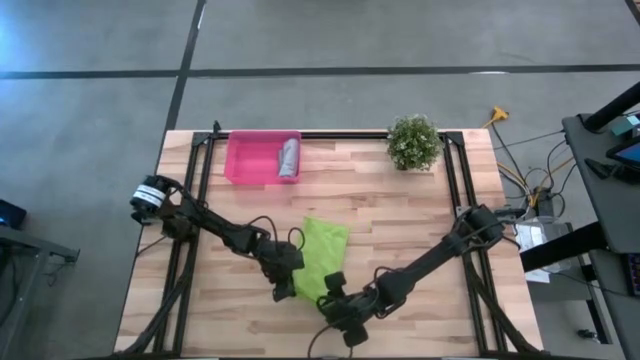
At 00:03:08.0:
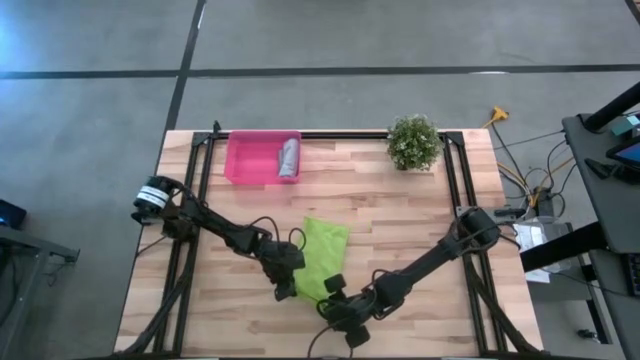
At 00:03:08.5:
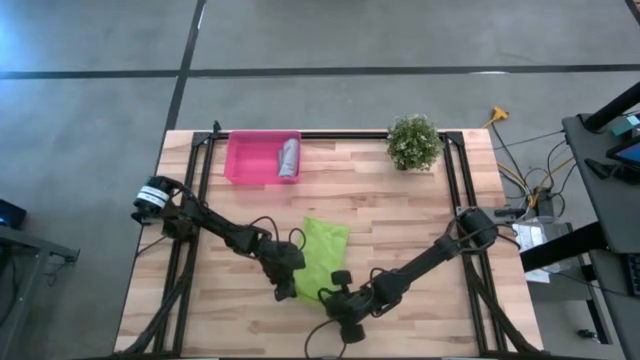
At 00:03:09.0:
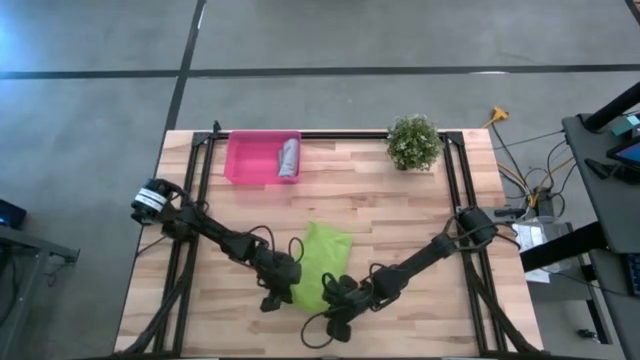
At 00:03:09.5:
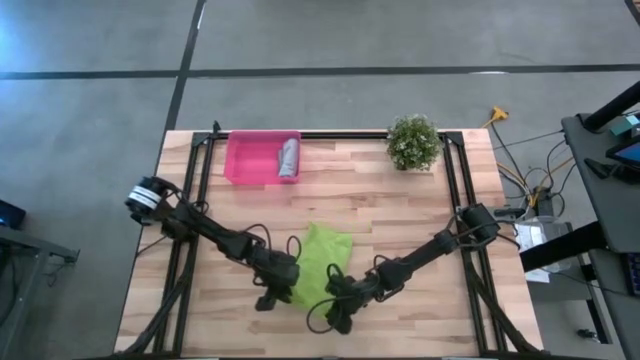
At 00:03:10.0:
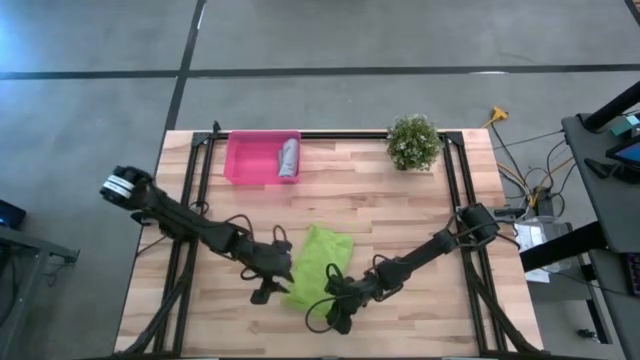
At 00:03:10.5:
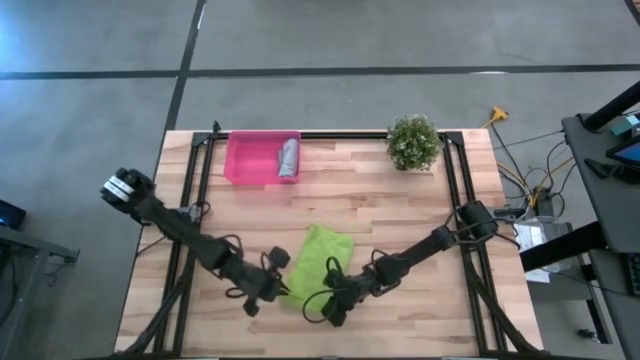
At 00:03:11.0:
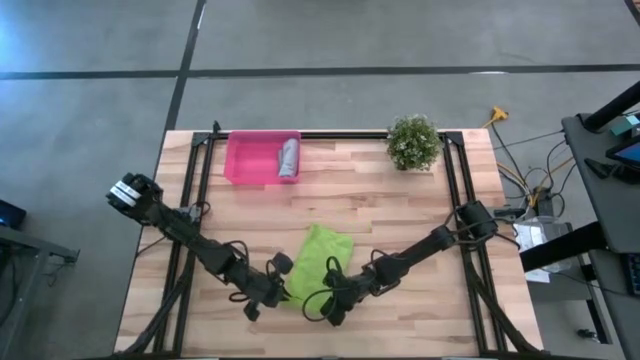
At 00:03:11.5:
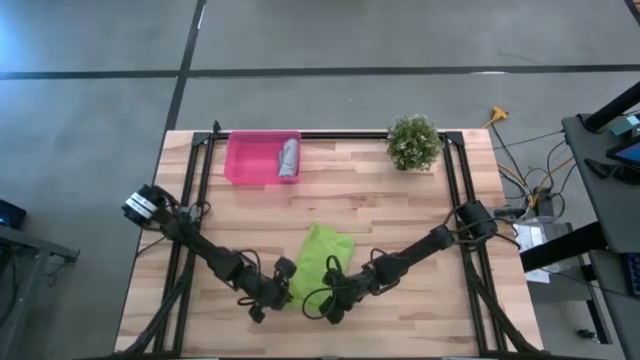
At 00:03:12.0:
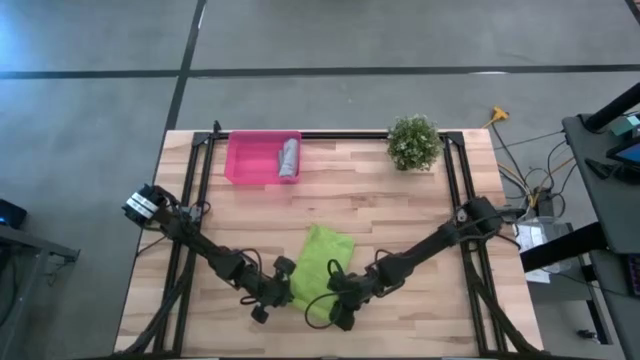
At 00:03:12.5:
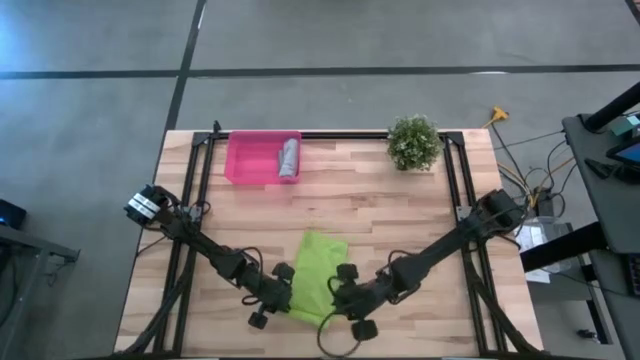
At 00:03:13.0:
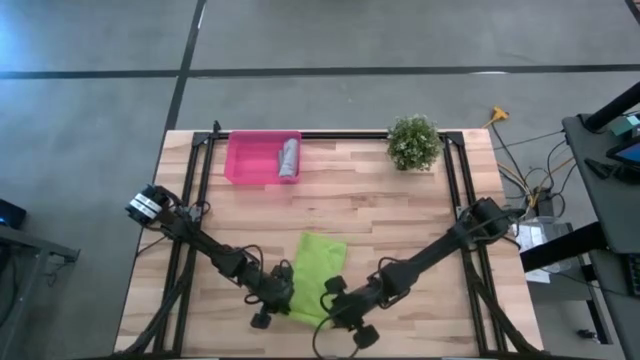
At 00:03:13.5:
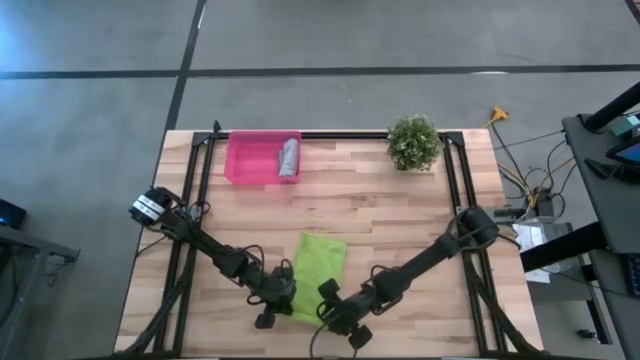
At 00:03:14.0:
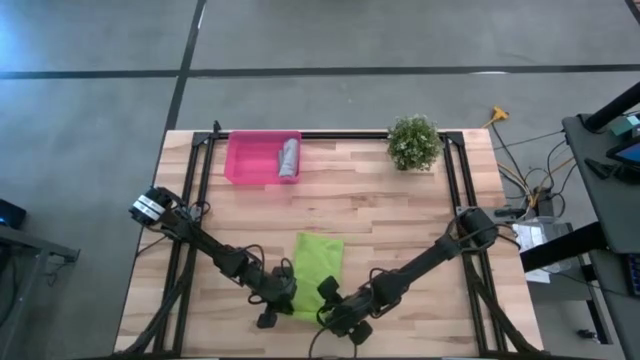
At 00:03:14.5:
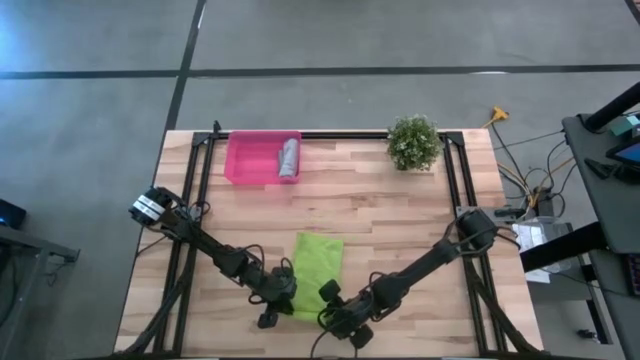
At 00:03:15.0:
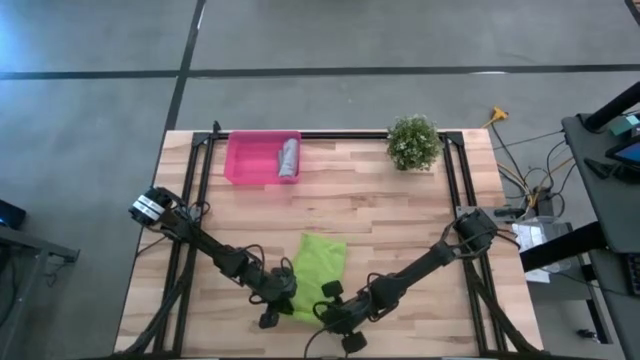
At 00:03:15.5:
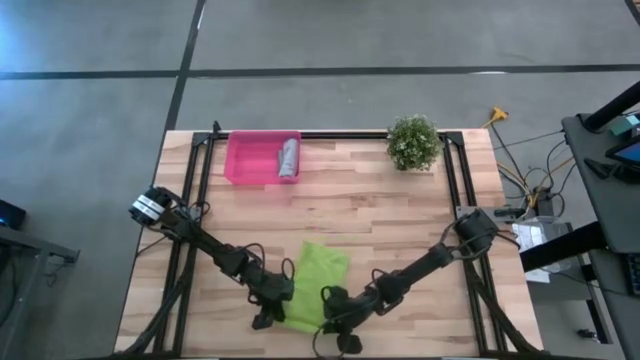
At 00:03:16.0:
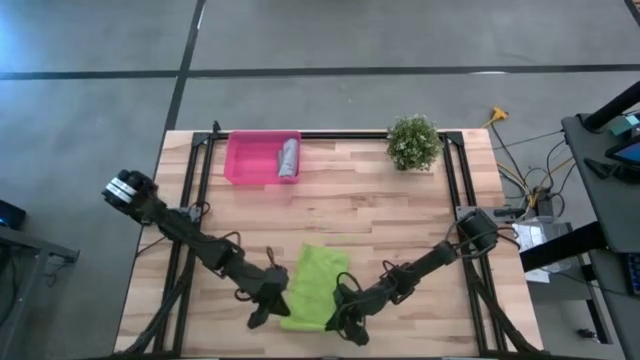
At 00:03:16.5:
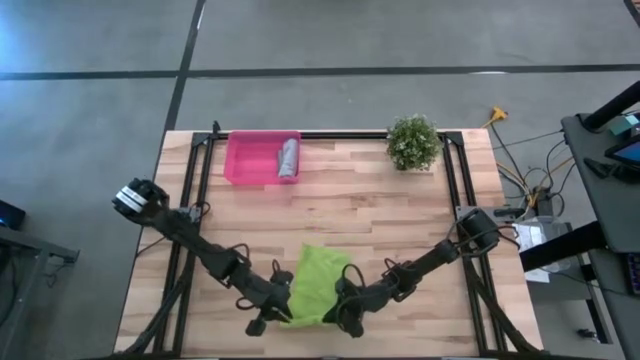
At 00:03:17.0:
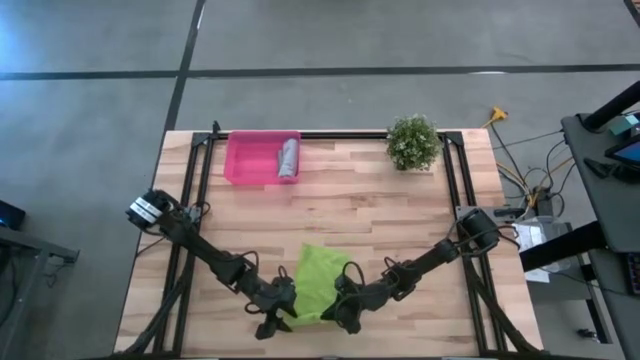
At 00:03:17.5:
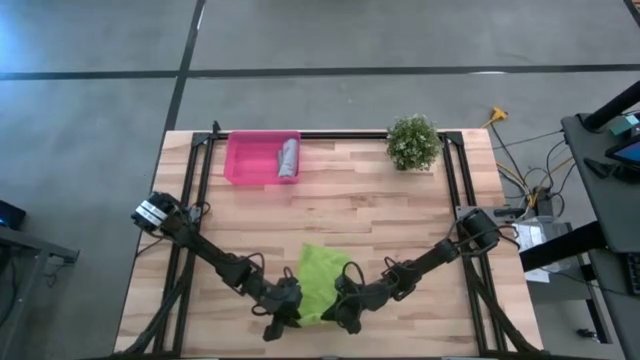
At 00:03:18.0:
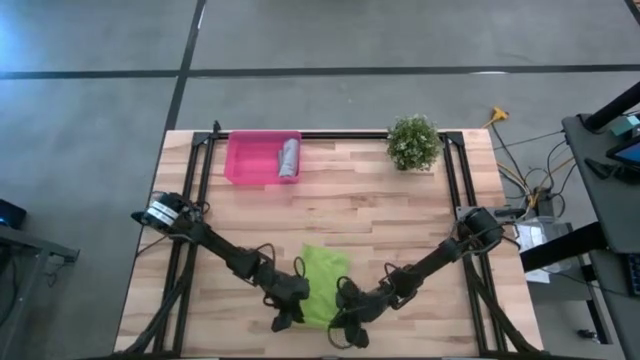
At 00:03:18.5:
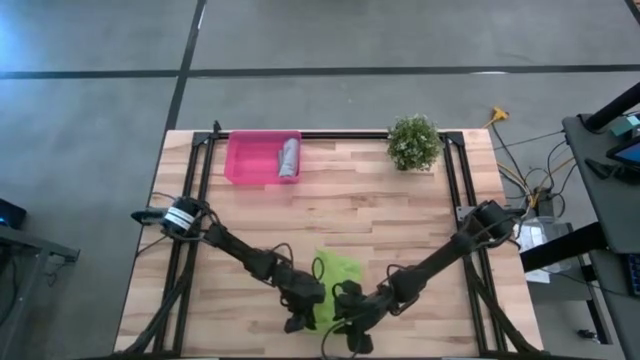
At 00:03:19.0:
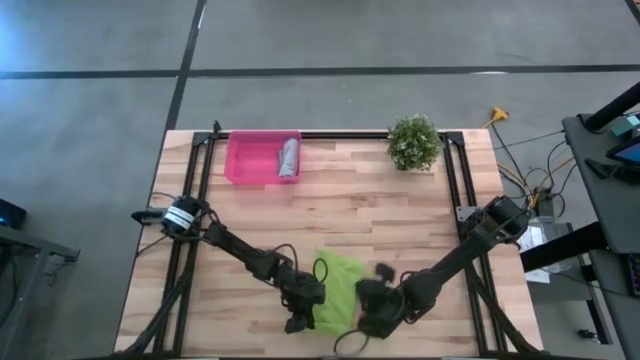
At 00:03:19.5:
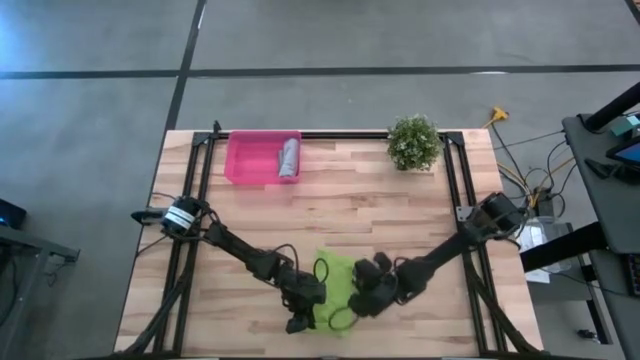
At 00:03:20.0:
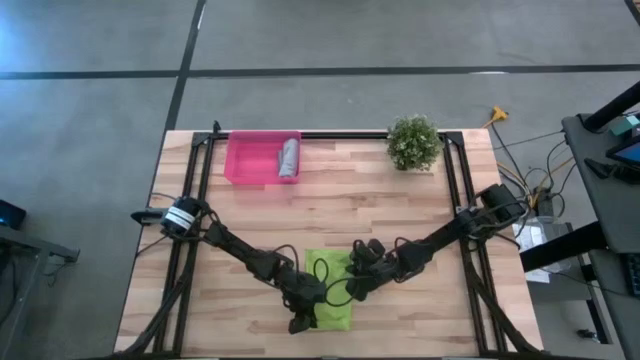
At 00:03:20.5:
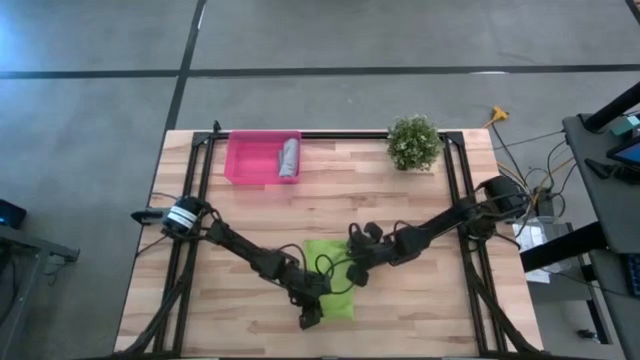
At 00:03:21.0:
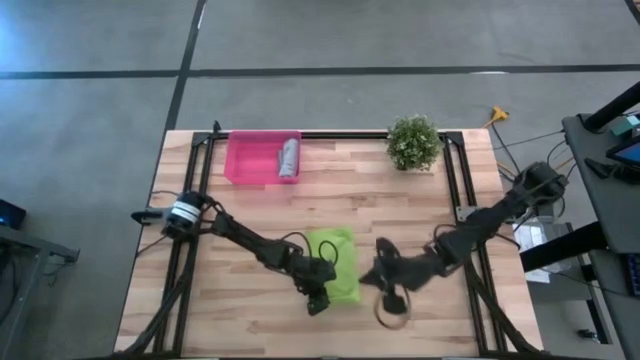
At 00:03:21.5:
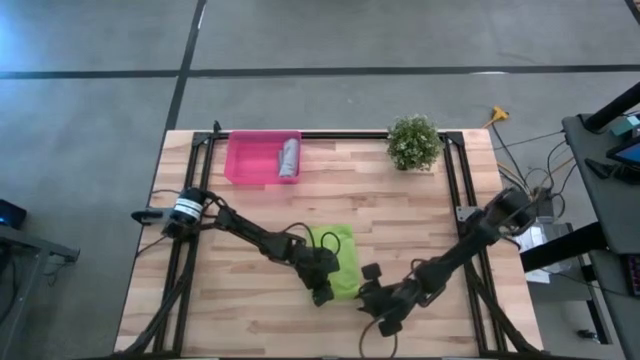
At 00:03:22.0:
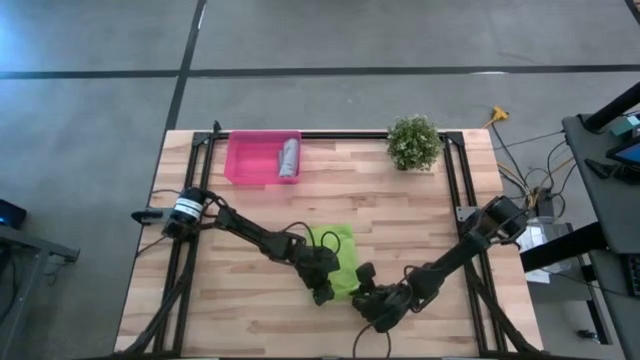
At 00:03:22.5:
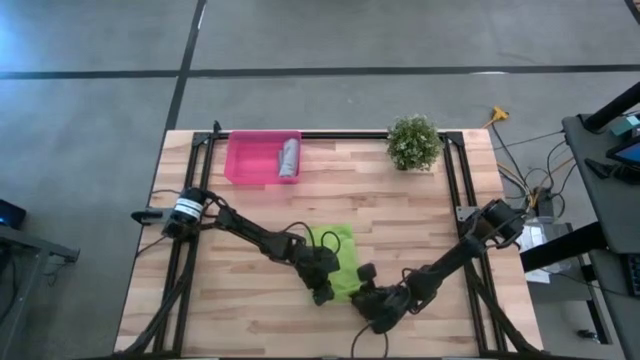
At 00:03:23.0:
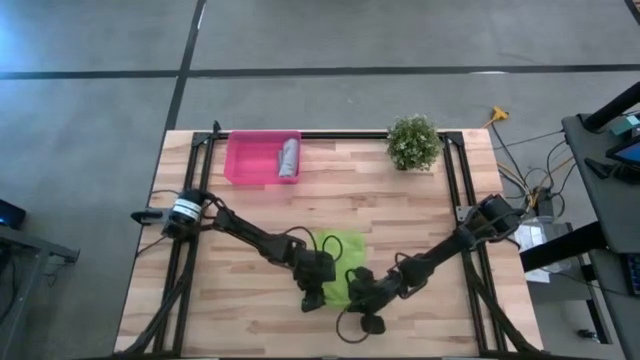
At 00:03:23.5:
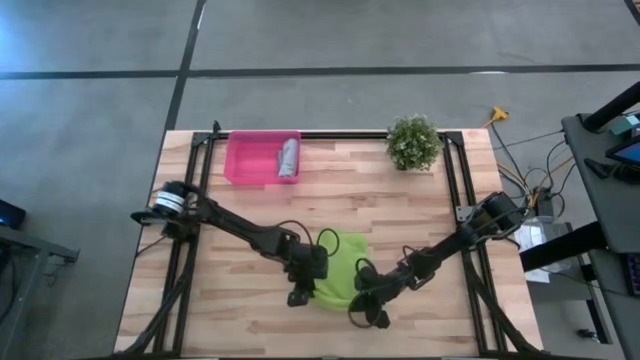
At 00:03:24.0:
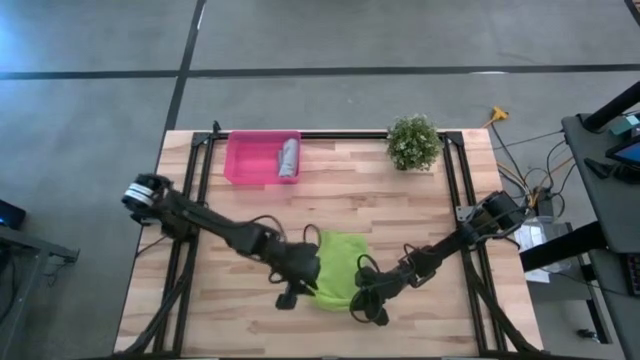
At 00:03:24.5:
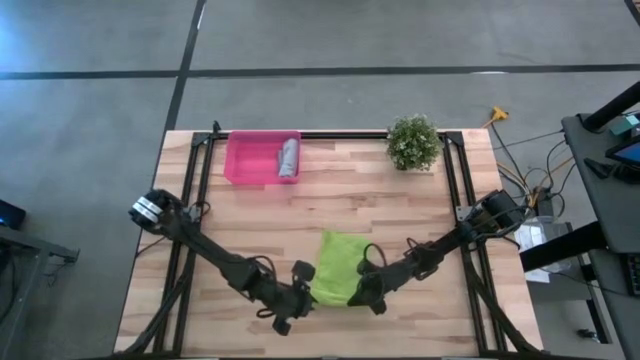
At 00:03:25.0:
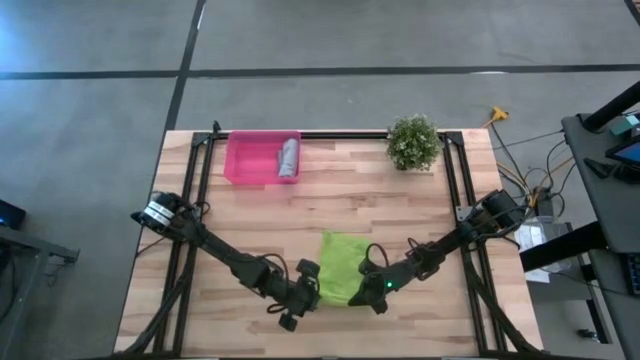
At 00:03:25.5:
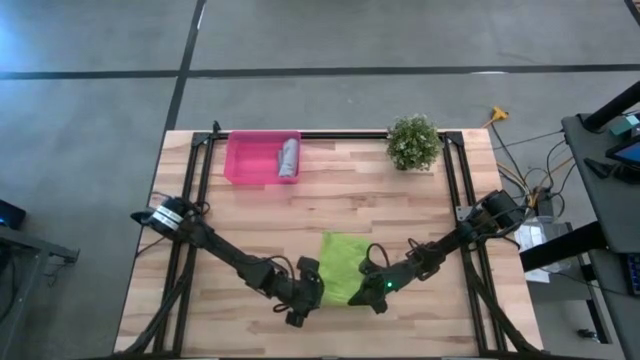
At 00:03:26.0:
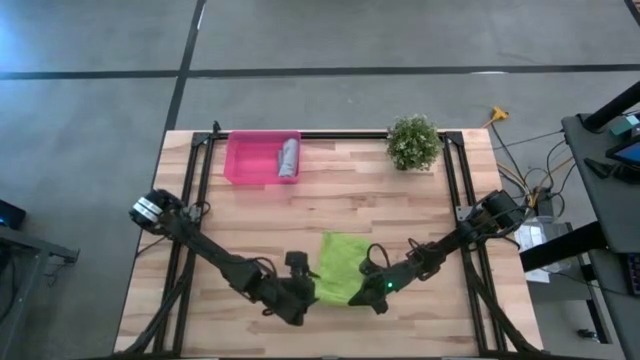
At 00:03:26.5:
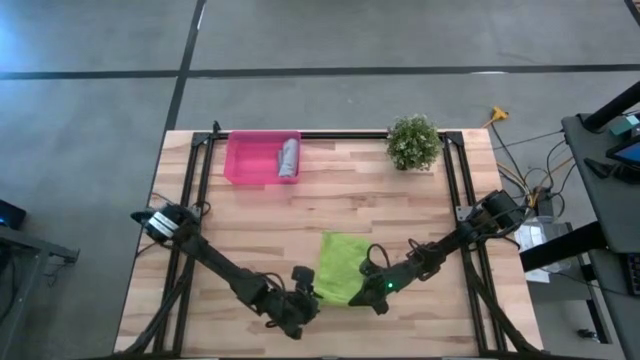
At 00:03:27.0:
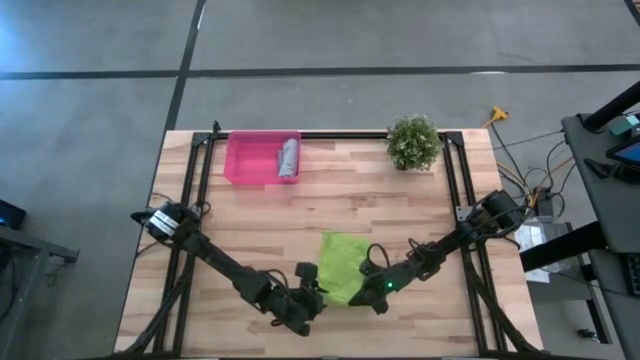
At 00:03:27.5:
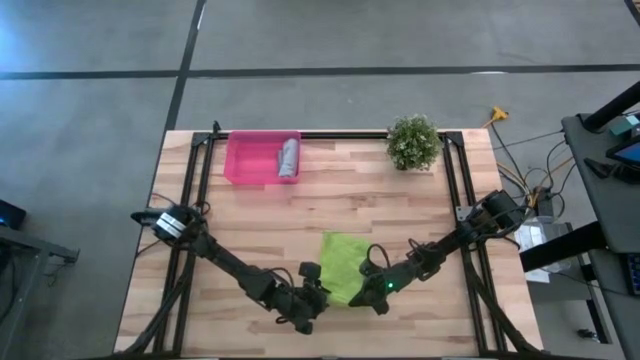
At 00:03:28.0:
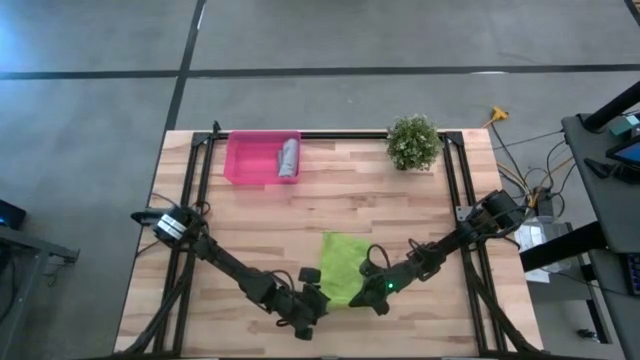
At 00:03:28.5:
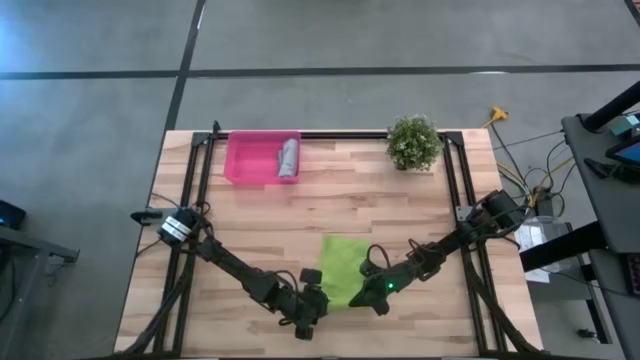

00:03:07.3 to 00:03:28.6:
Task: Roll microfiber towels into tight, uniform cylinder then place into a basket
Roll the green microfiber cloth
